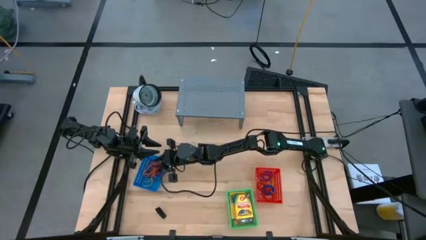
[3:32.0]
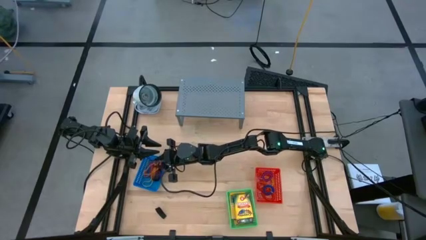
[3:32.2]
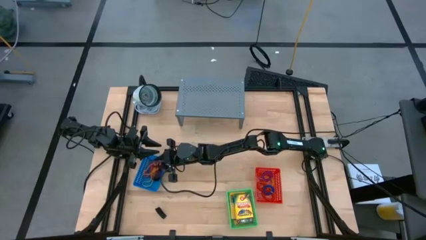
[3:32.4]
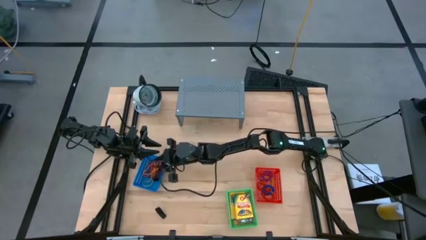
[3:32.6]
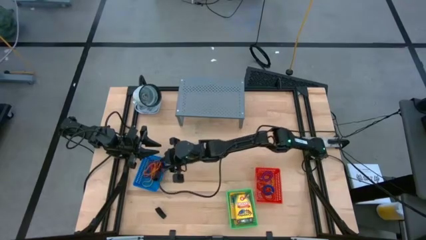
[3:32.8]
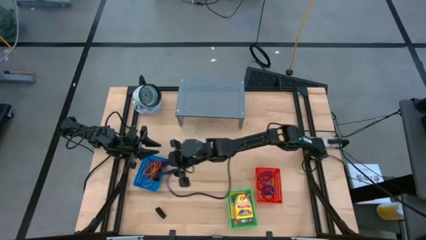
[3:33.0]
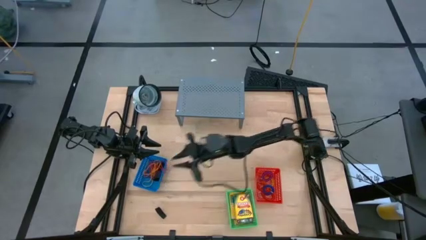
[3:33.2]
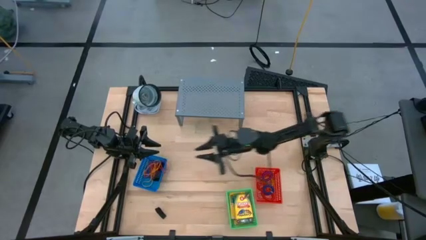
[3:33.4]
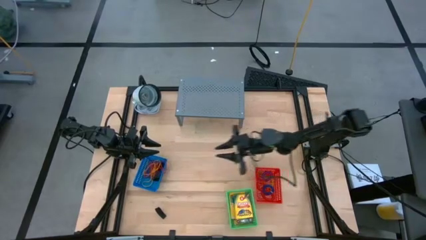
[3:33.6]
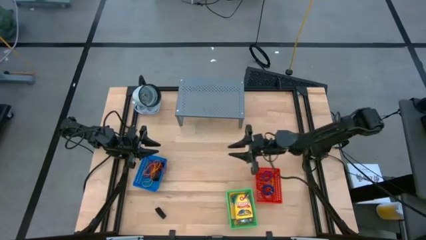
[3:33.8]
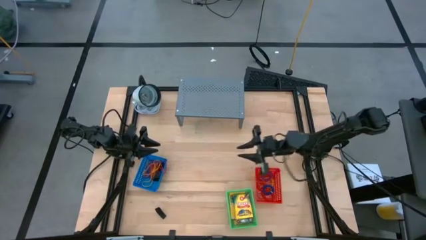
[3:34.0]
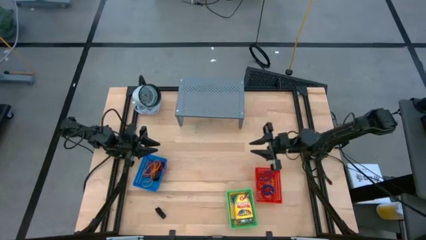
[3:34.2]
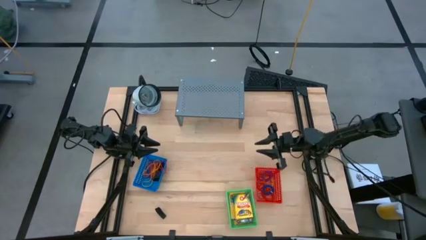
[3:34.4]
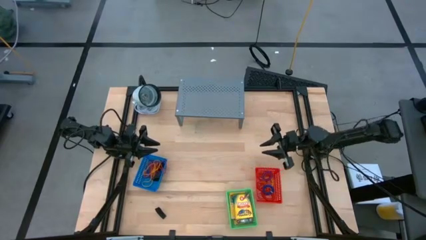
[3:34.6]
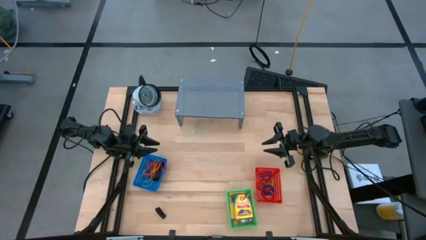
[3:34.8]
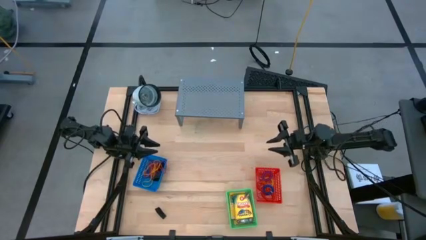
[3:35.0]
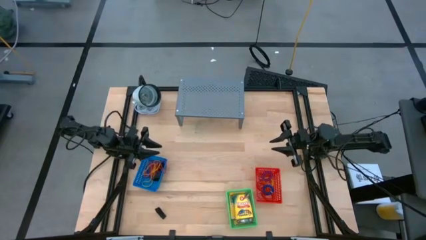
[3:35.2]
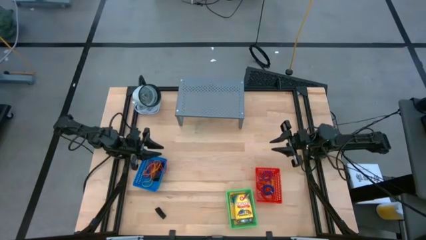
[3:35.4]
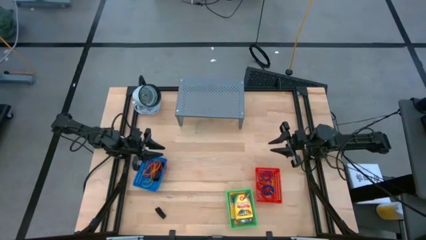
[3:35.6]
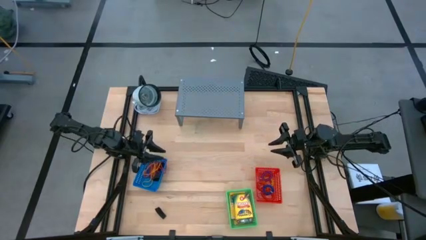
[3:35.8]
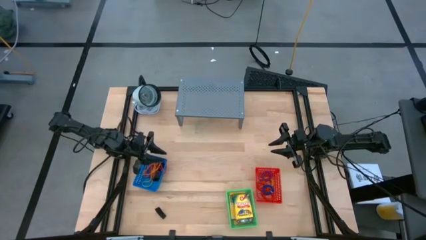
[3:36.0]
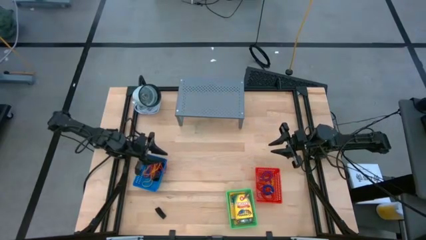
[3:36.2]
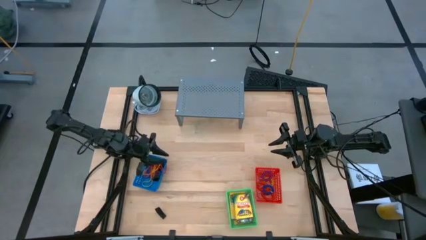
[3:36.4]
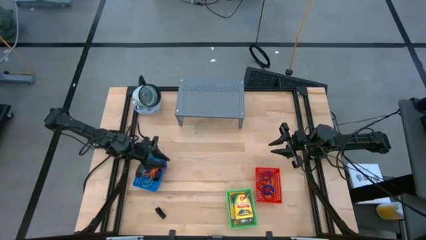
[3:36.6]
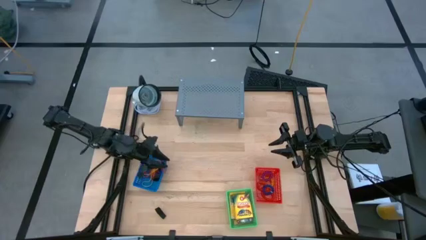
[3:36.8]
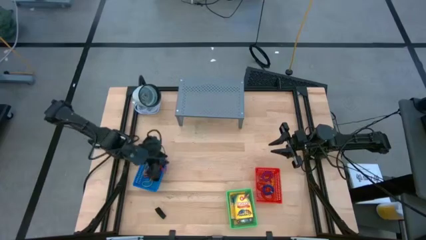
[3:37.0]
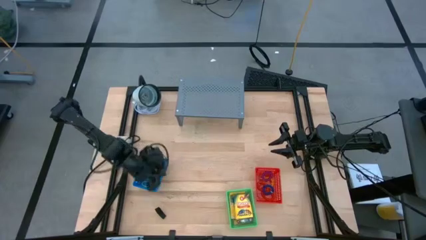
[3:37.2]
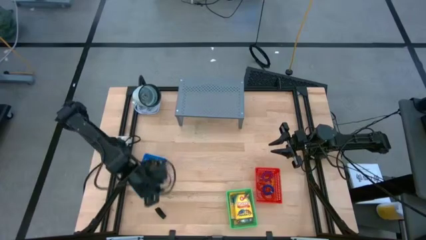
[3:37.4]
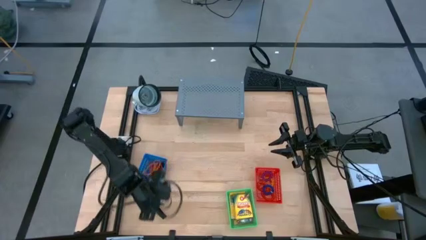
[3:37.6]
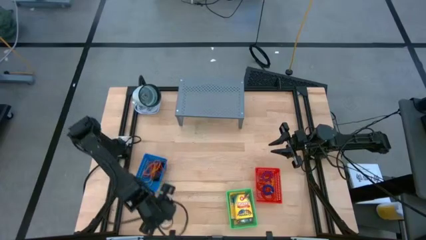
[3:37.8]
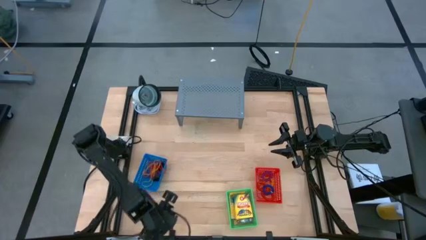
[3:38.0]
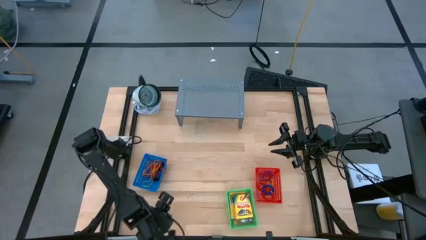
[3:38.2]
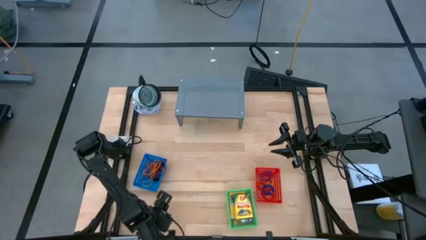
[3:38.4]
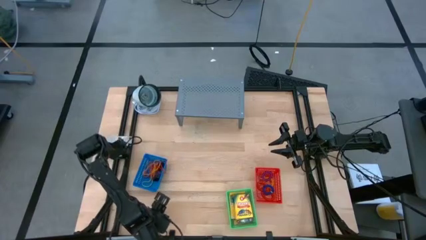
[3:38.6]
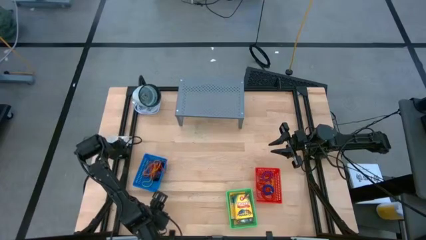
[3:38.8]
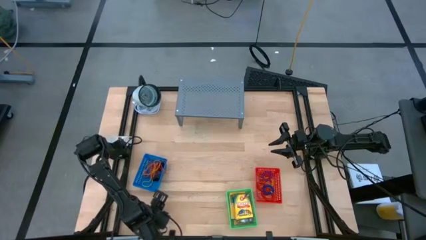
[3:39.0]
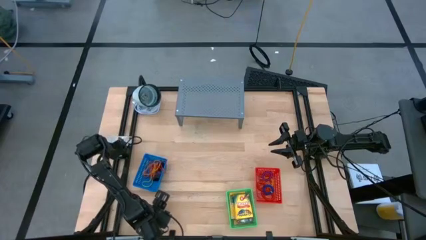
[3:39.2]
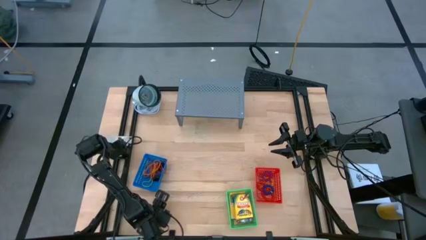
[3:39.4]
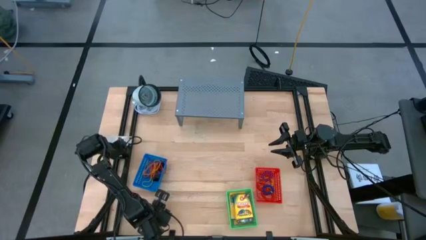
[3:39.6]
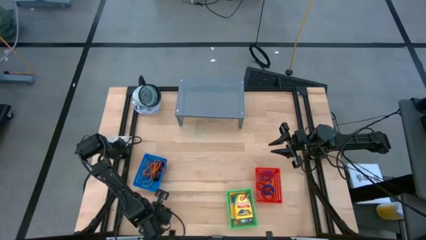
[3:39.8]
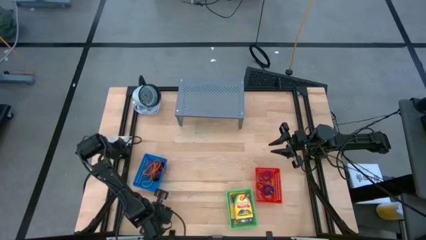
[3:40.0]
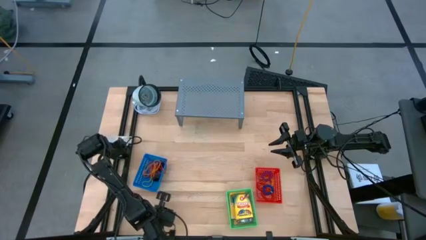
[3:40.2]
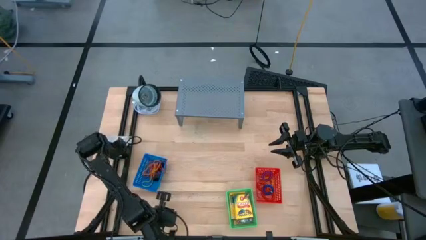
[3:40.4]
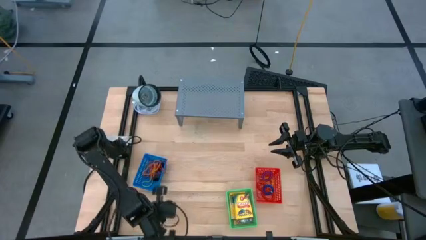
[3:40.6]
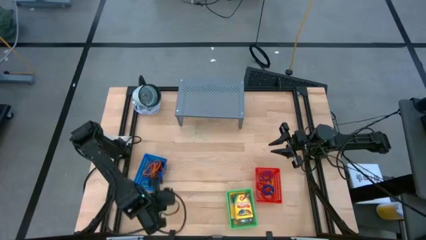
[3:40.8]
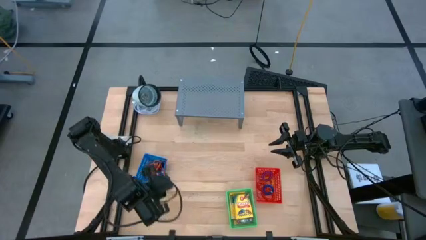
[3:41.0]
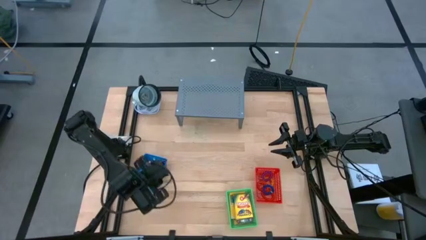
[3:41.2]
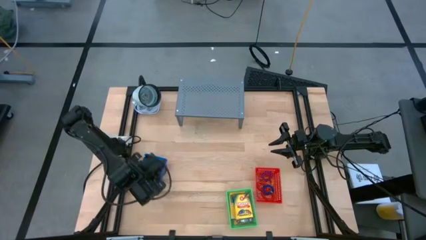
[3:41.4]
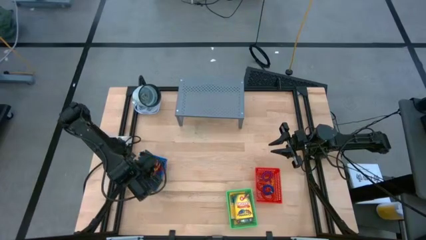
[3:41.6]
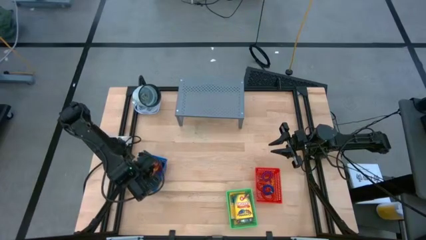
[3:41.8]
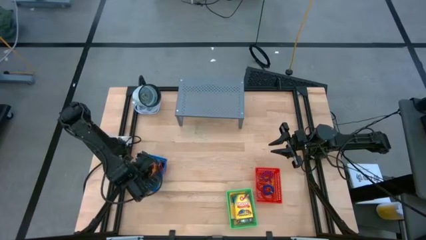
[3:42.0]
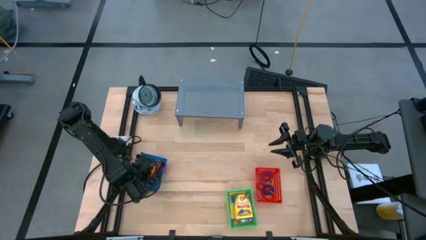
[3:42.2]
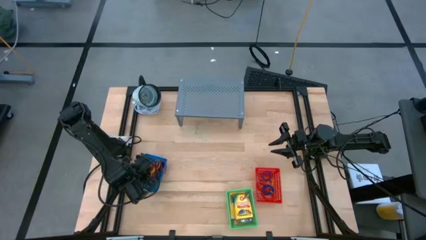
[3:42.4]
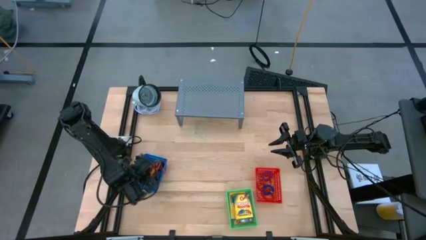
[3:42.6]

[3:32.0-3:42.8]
Task: Pick & Place Office Desk Supplies
Put the black rubber band into the blue bin
